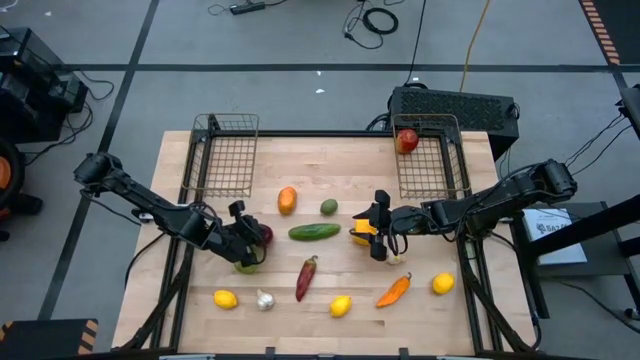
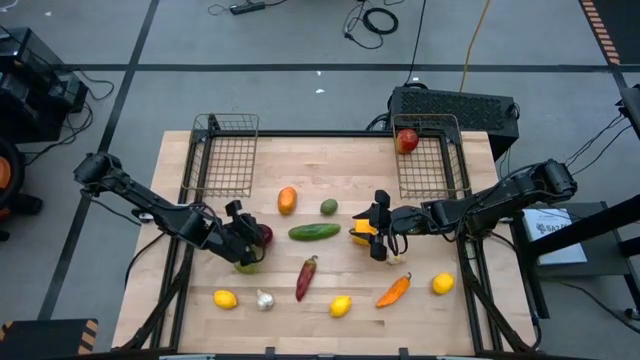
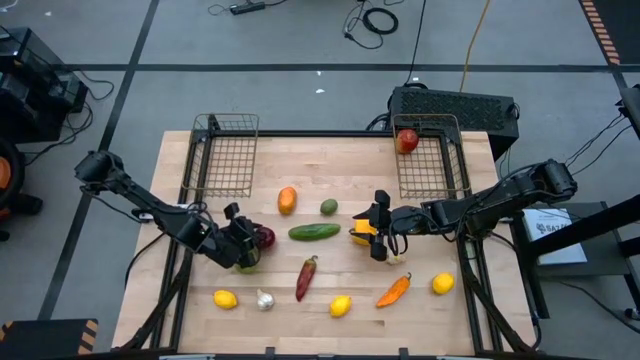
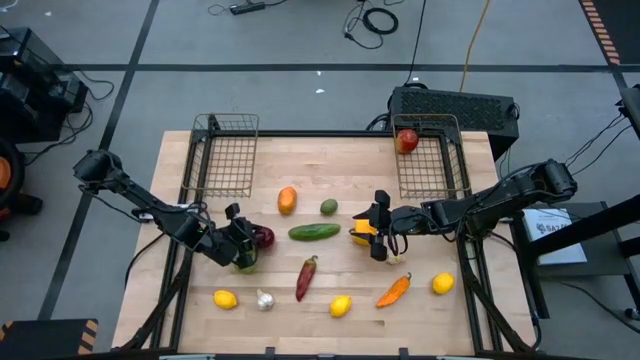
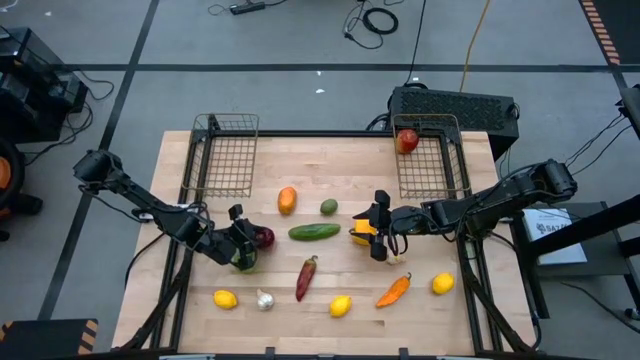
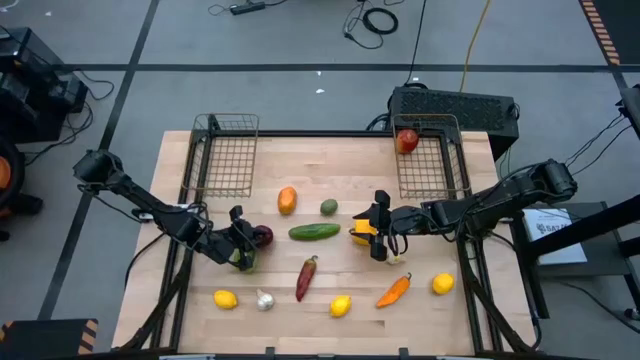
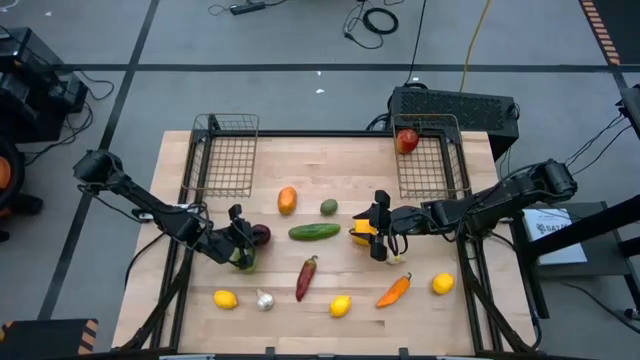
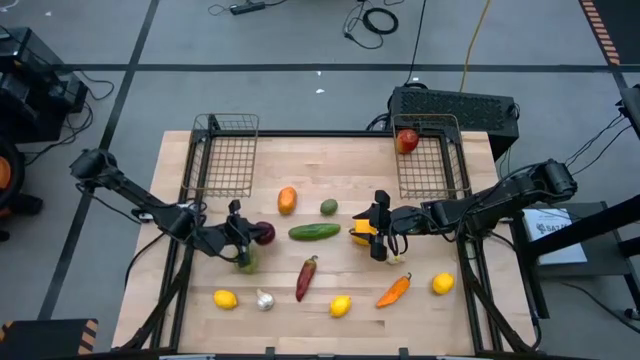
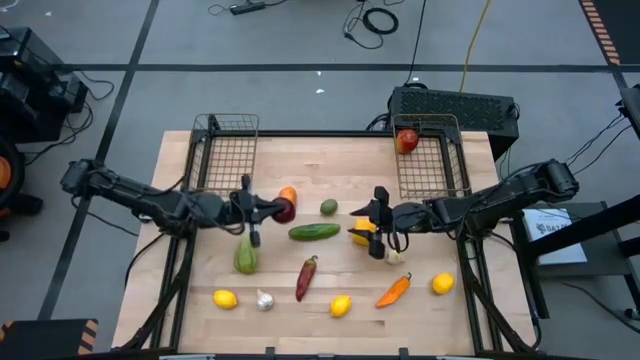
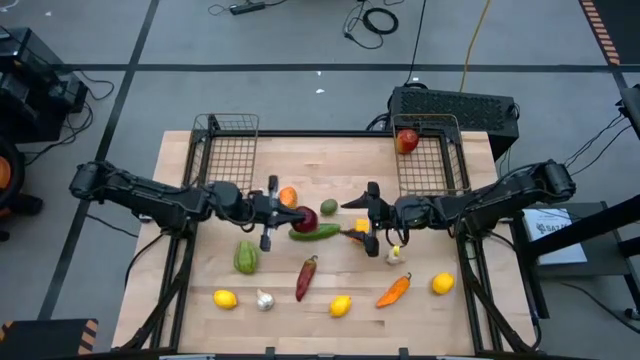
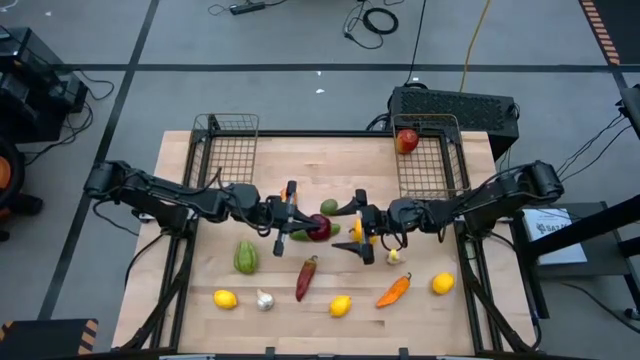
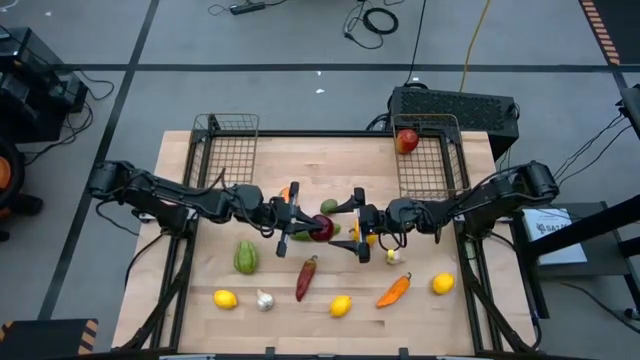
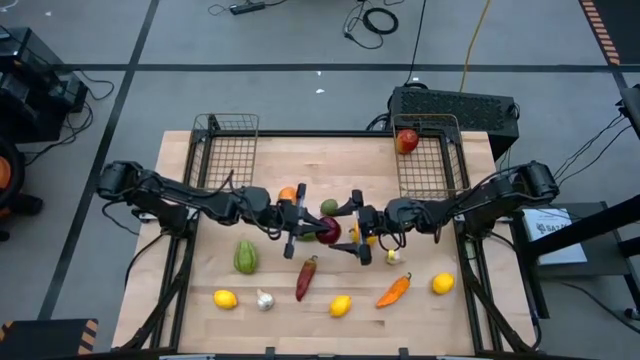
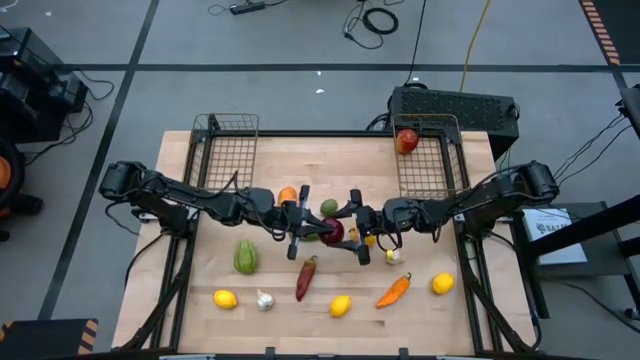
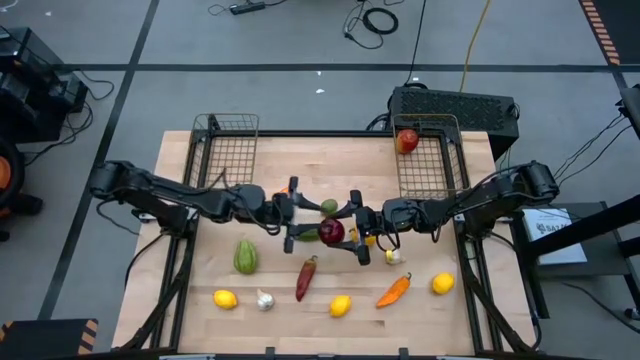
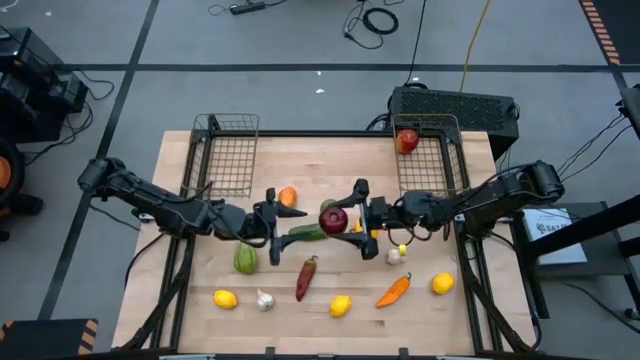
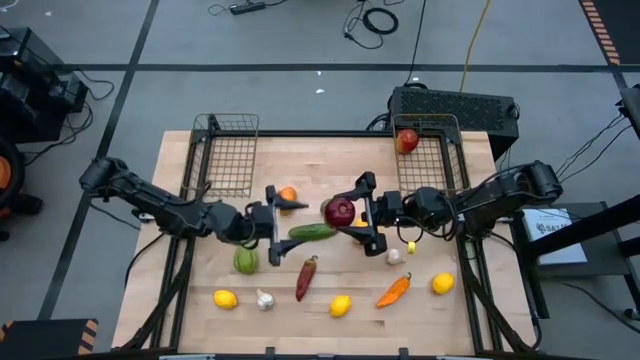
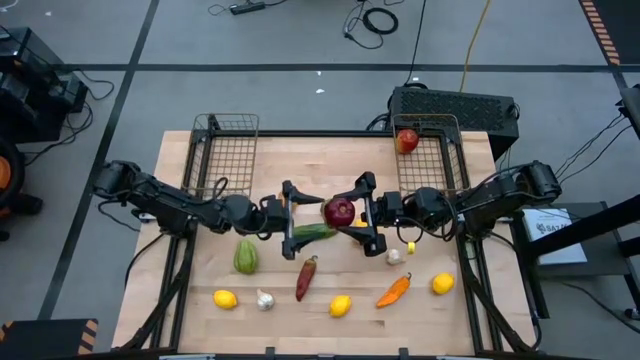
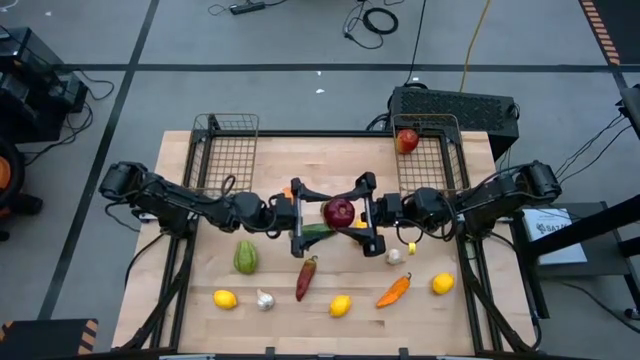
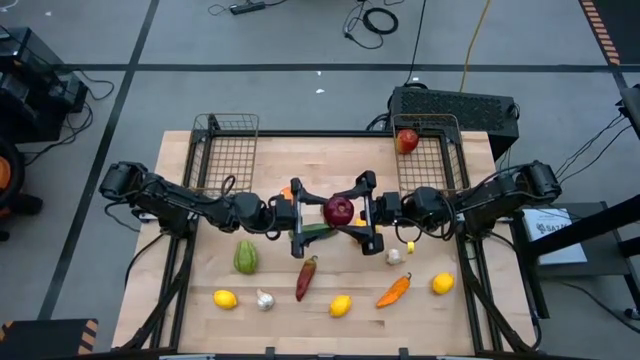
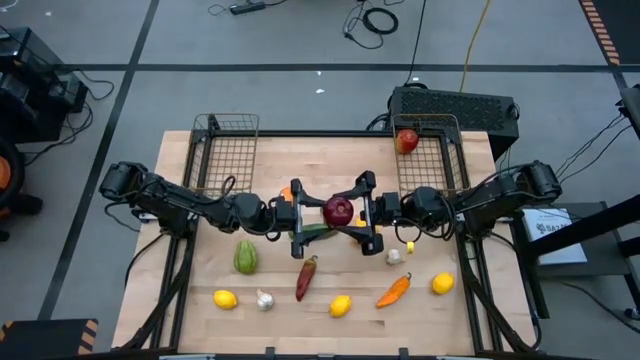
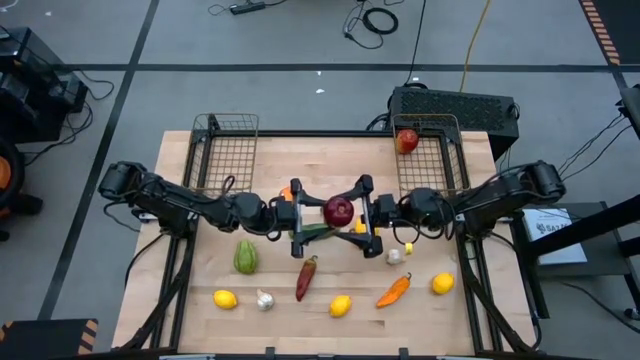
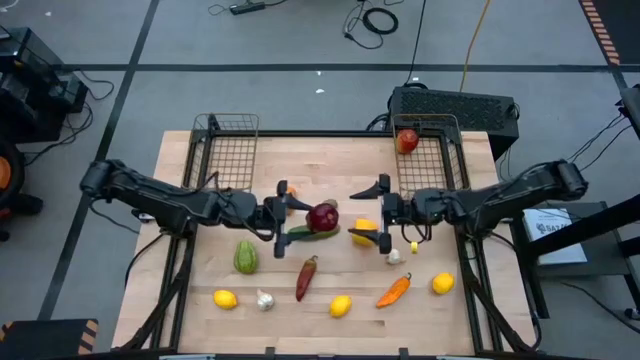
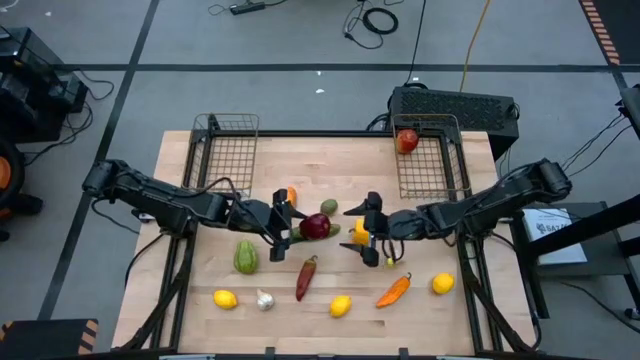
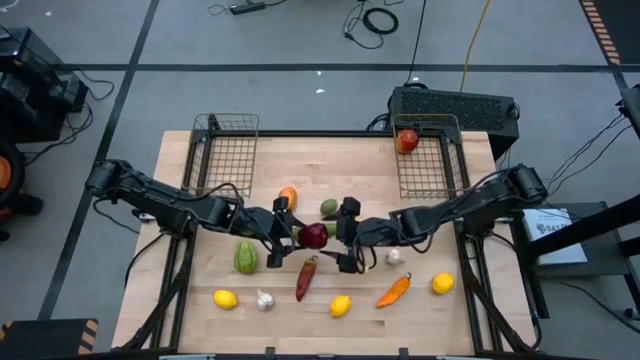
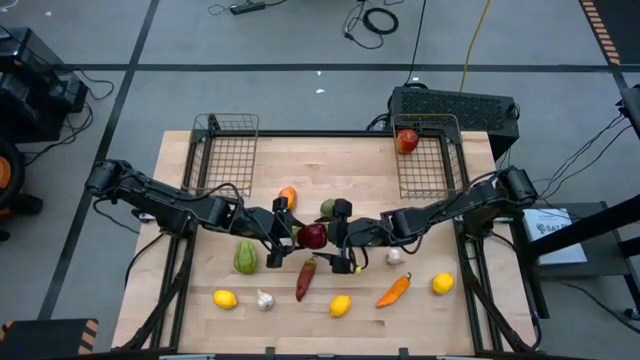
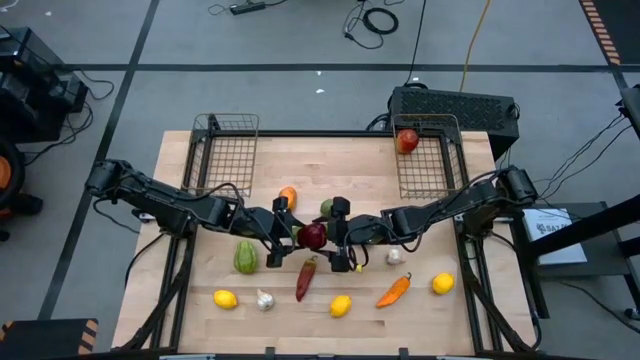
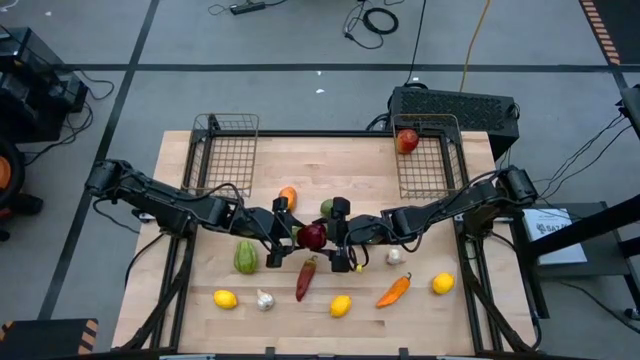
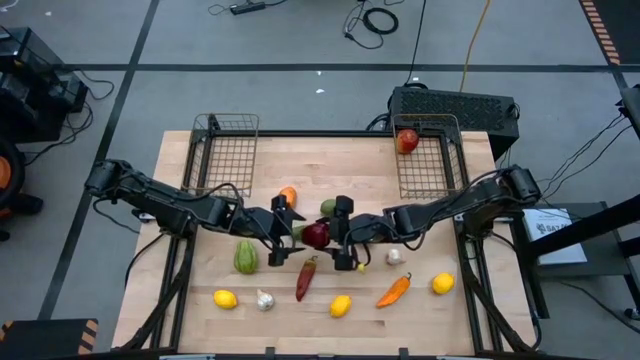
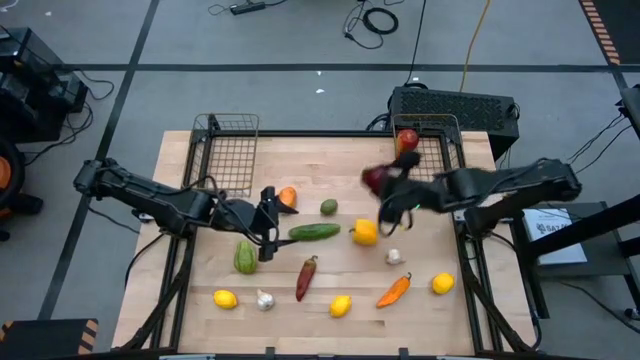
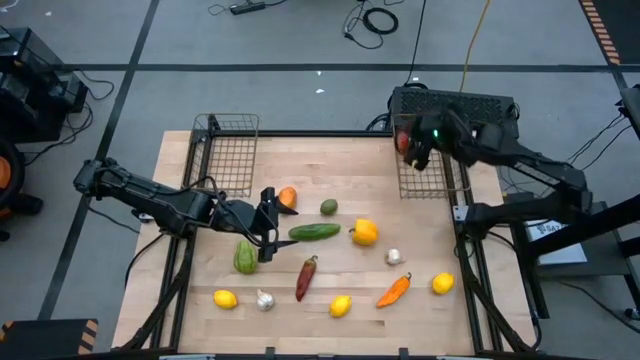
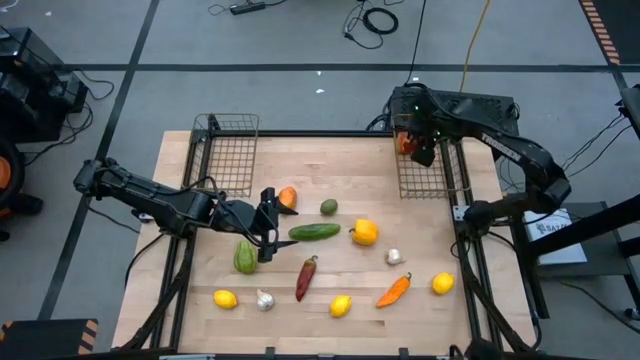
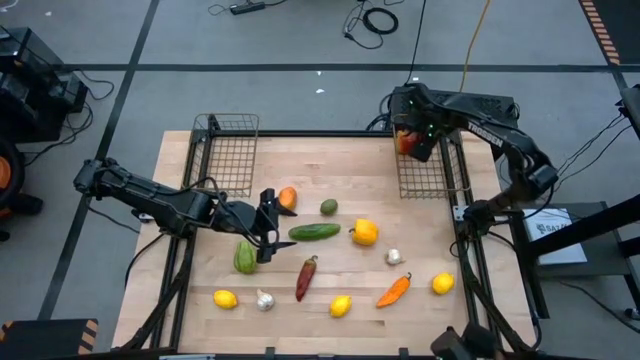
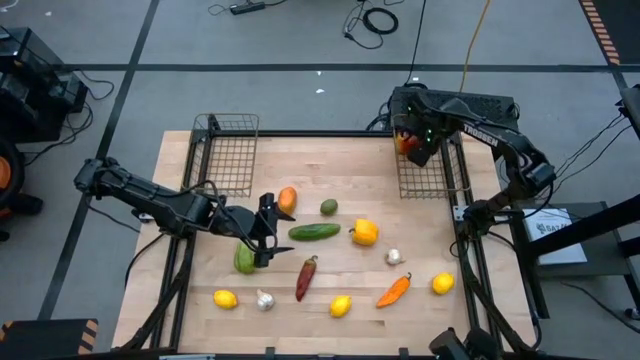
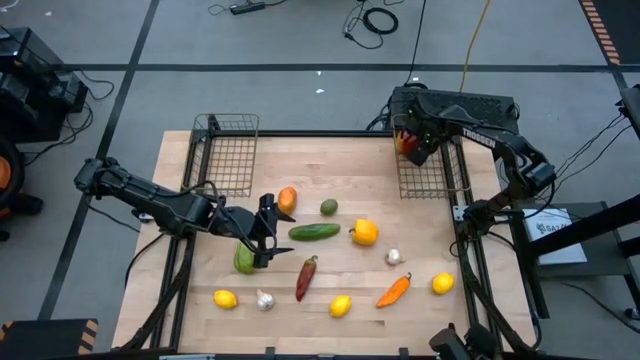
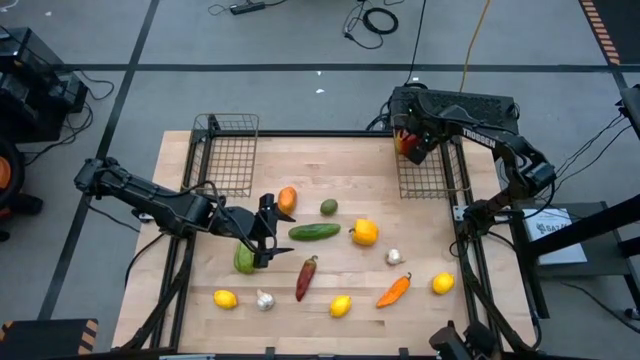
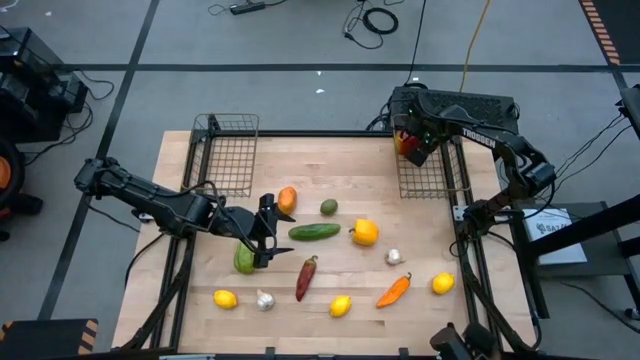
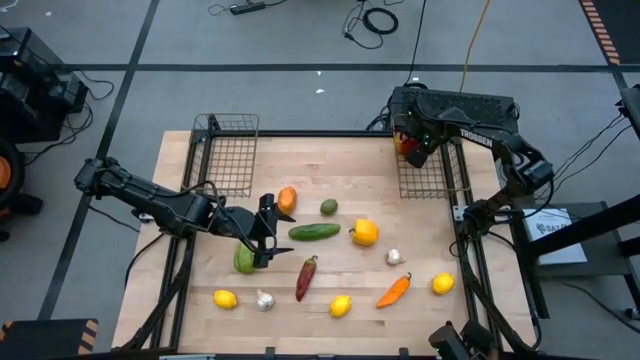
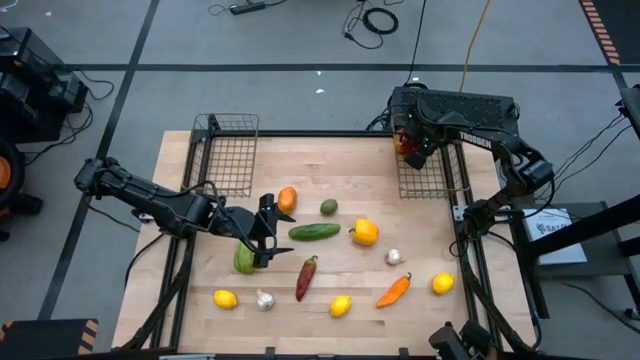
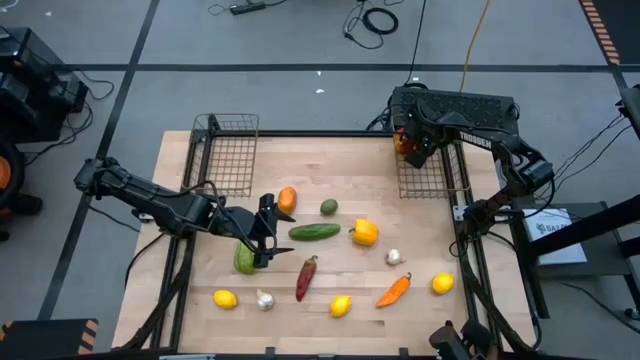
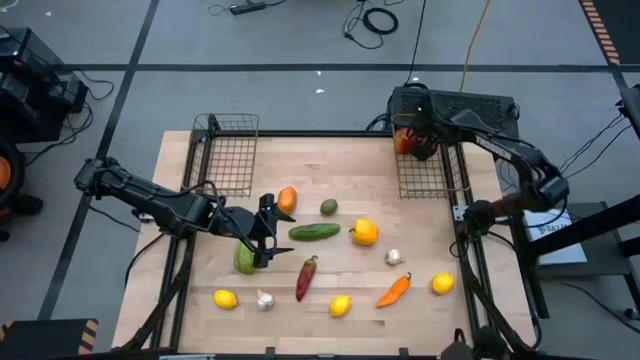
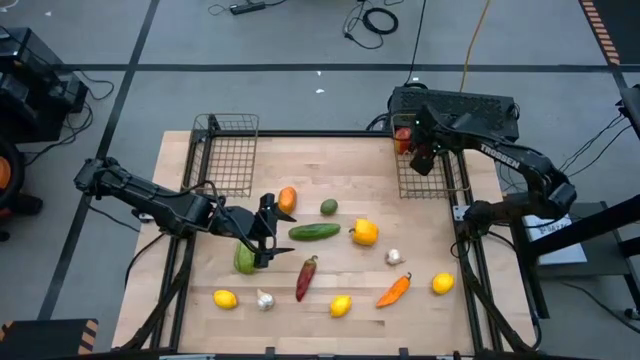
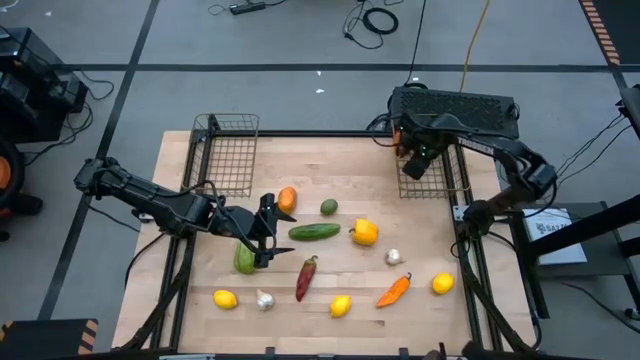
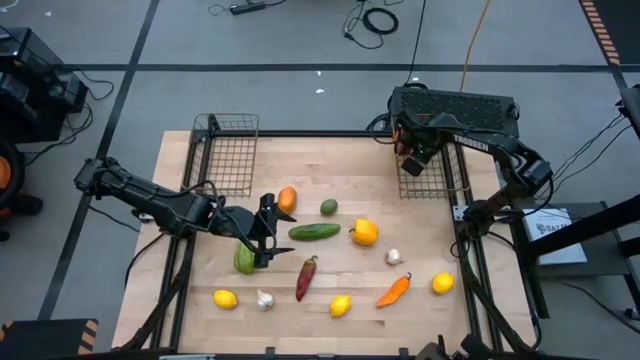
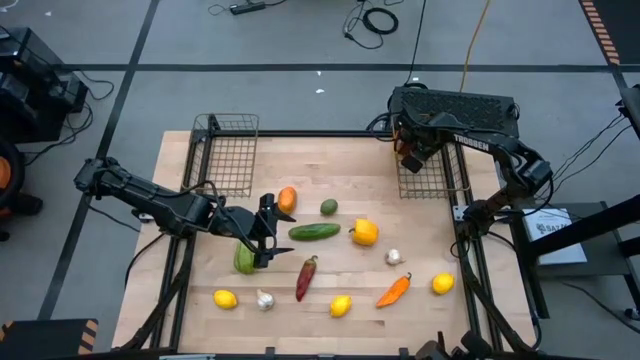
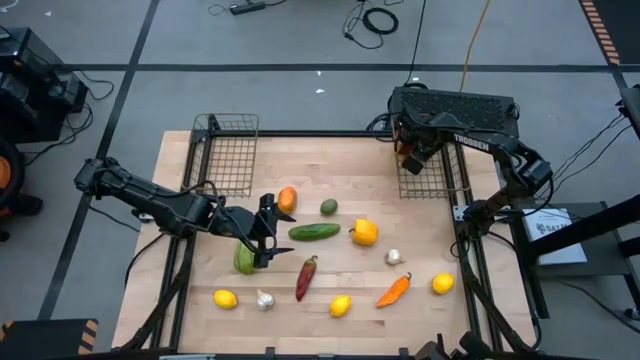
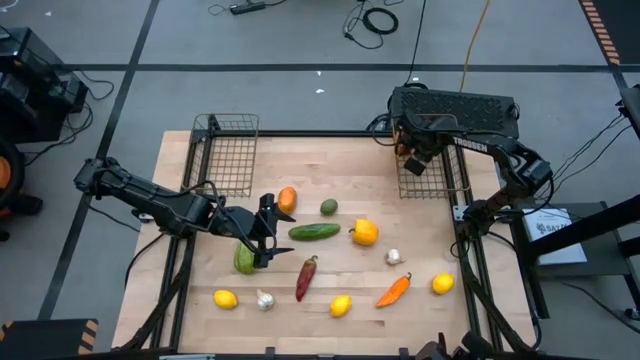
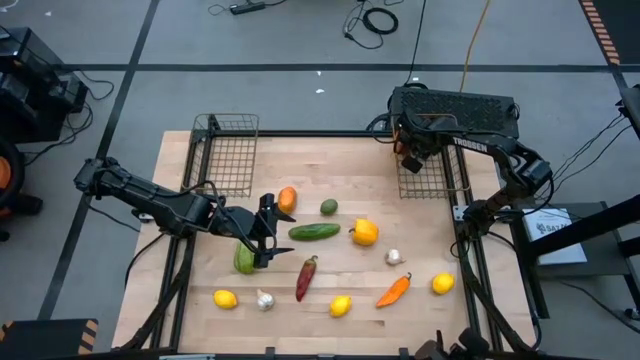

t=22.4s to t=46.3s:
Task: Sort produce into baskets
Put the left red apple into the right wire basket
